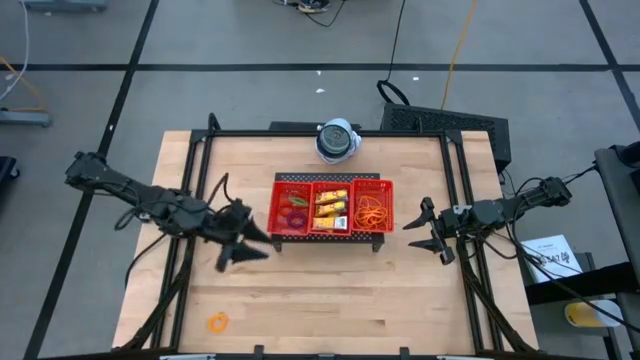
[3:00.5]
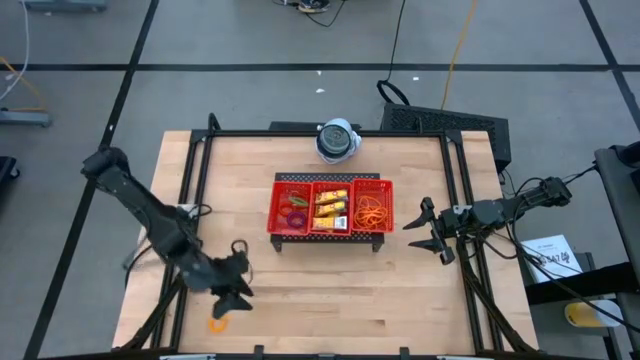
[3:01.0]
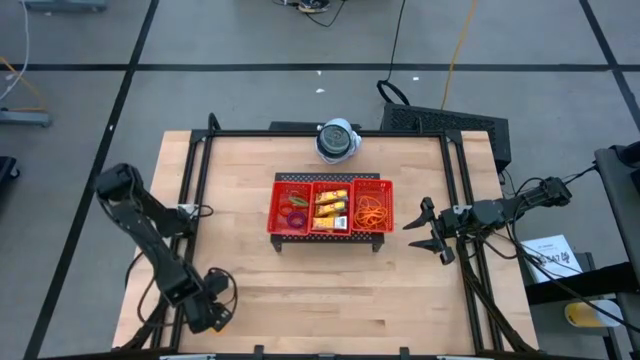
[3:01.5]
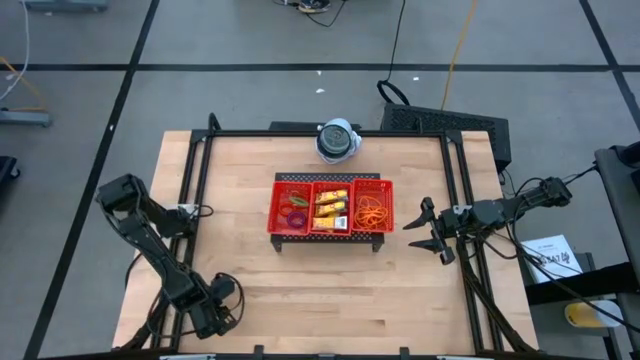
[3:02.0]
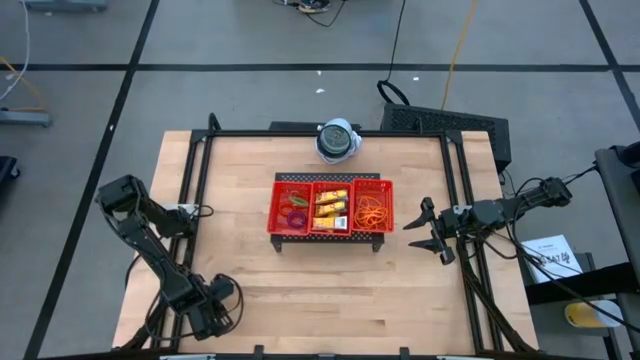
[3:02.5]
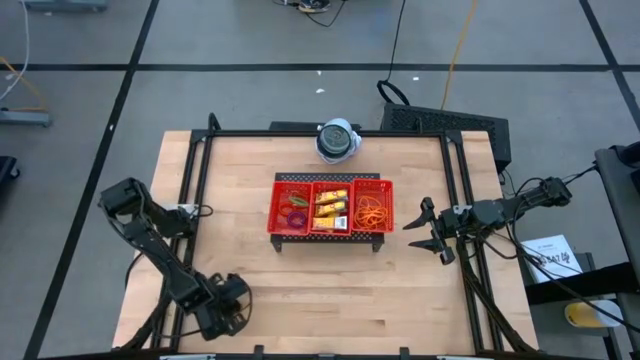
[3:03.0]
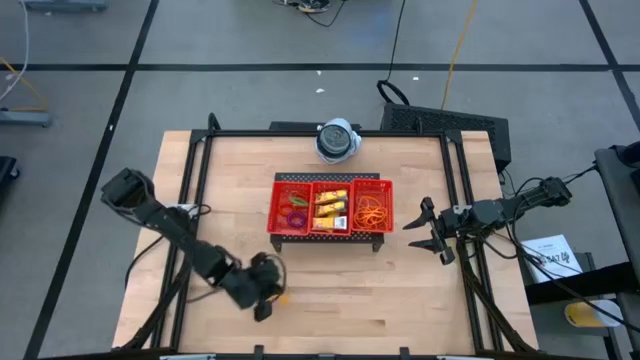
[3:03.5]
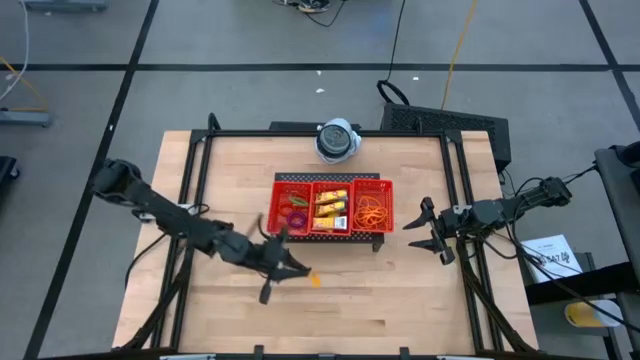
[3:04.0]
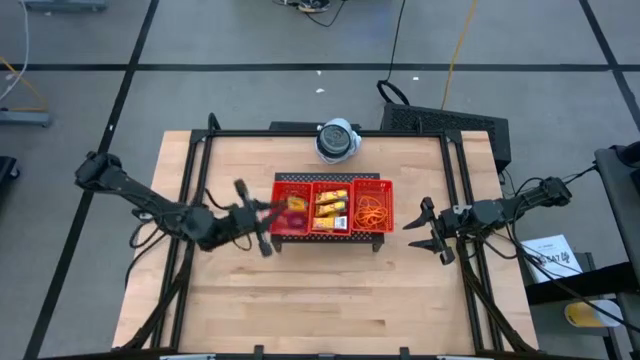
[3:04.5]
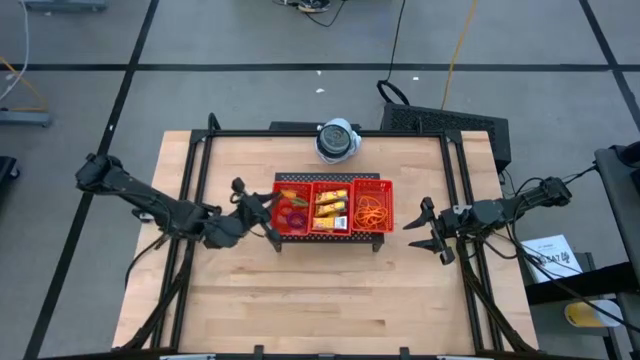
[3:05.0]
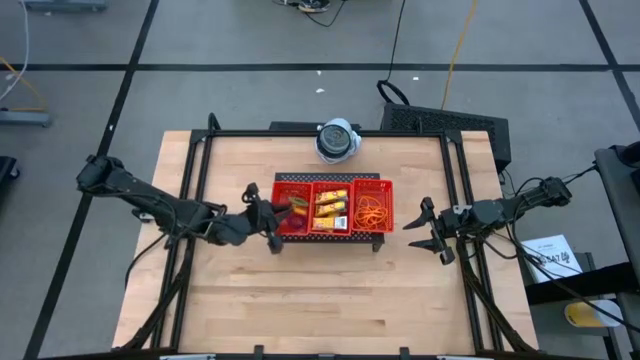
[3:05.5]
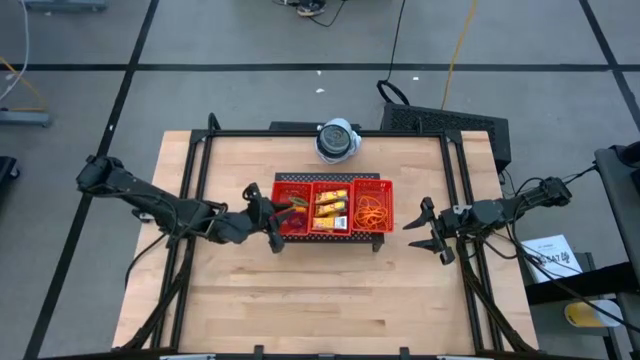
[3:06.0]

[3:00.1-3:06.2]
Task: Pick & Place Office Desk Supplies
Put the yellow spring keychain into the left red bin

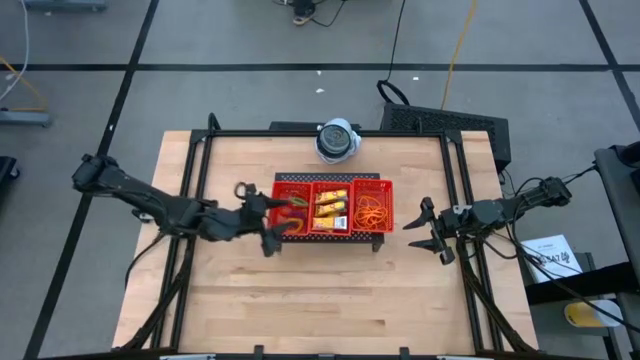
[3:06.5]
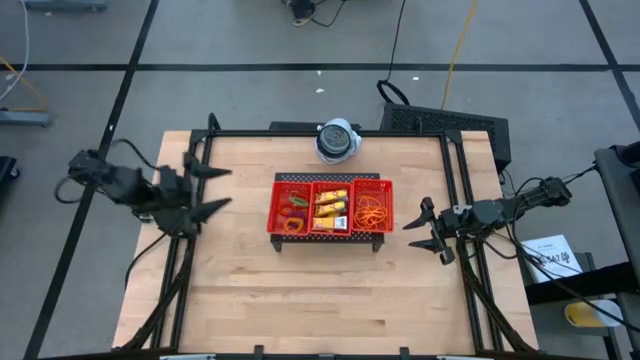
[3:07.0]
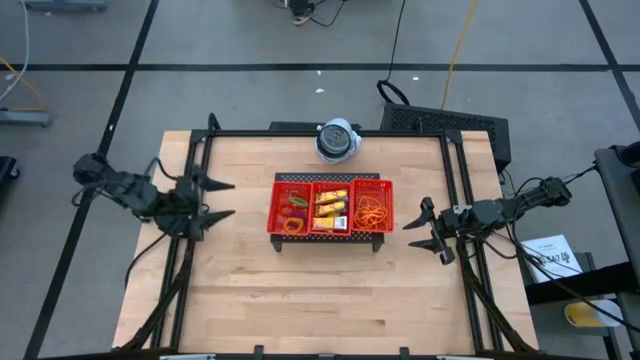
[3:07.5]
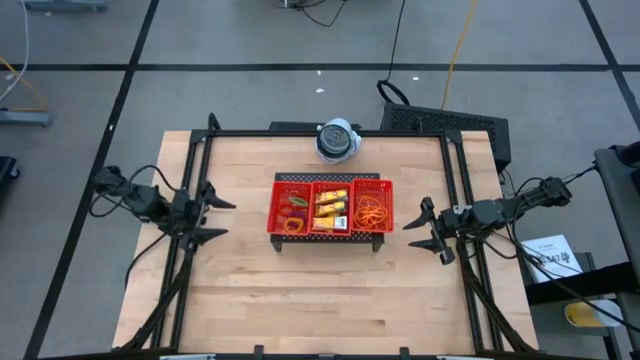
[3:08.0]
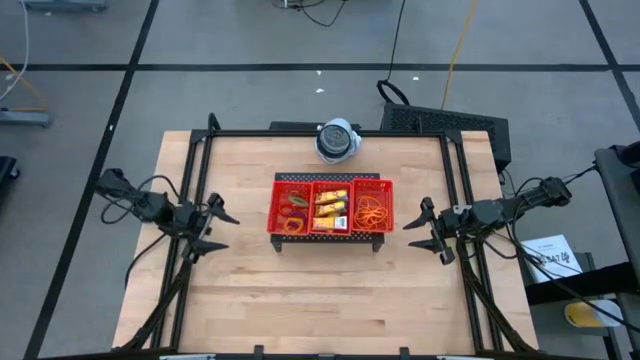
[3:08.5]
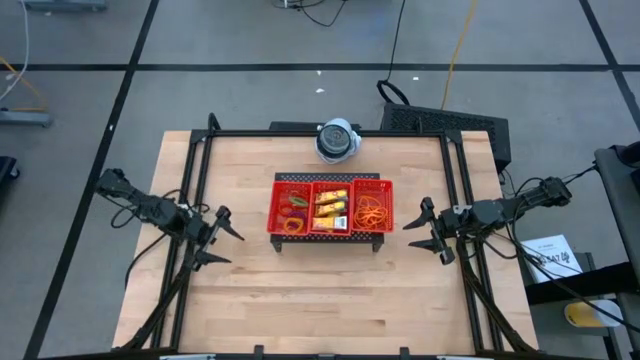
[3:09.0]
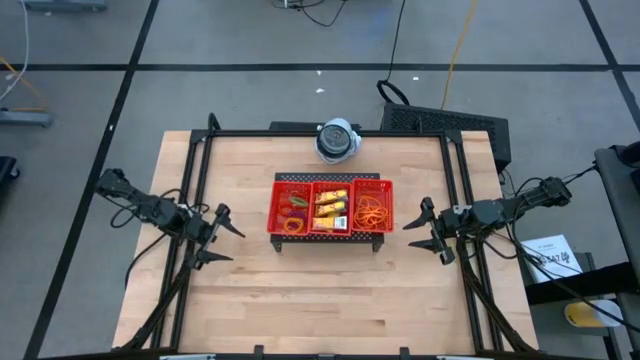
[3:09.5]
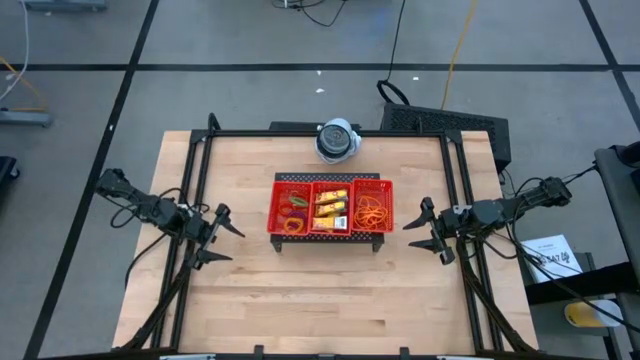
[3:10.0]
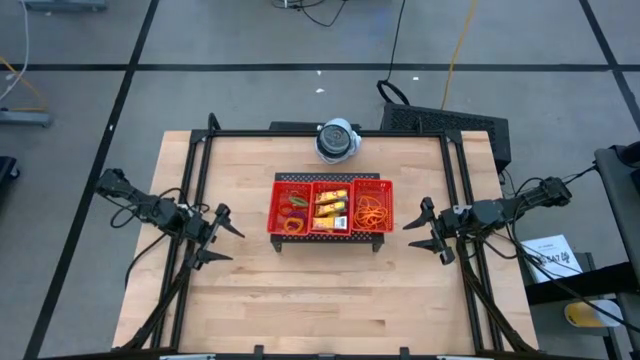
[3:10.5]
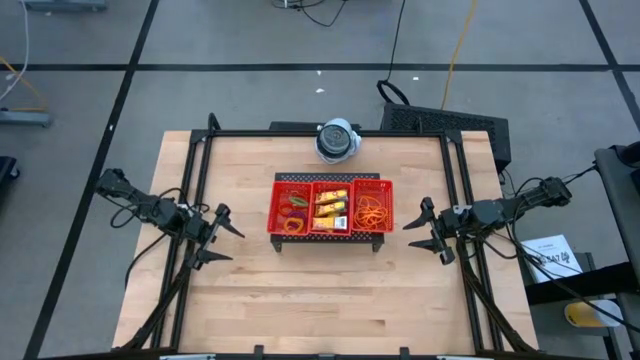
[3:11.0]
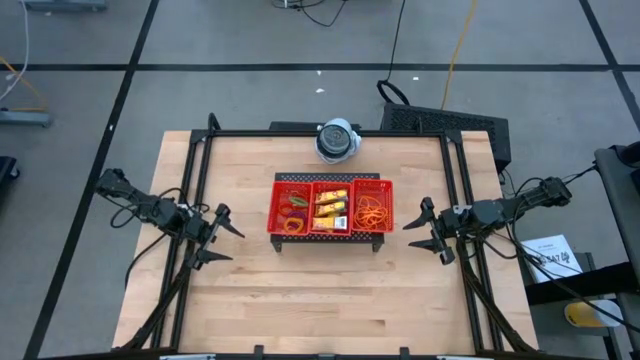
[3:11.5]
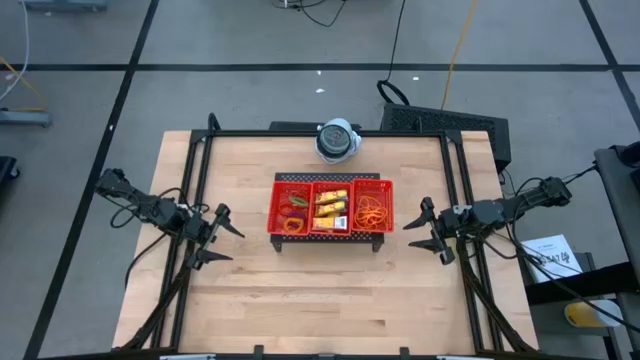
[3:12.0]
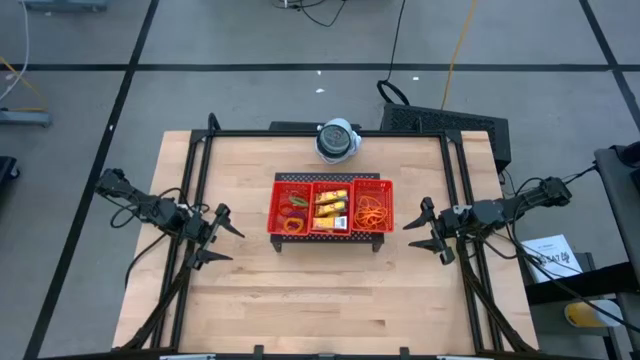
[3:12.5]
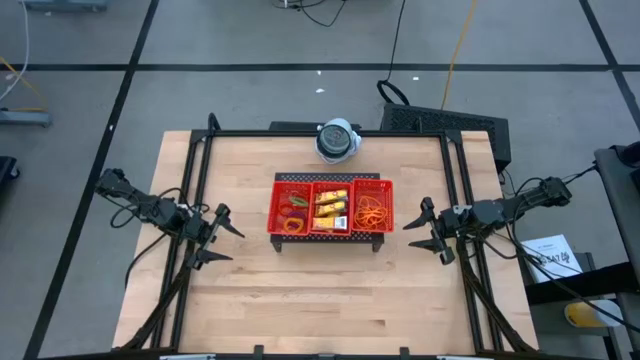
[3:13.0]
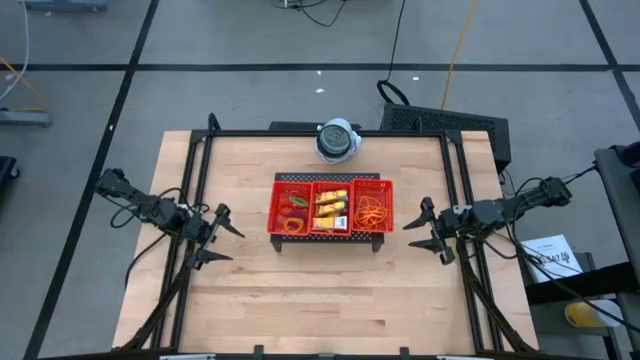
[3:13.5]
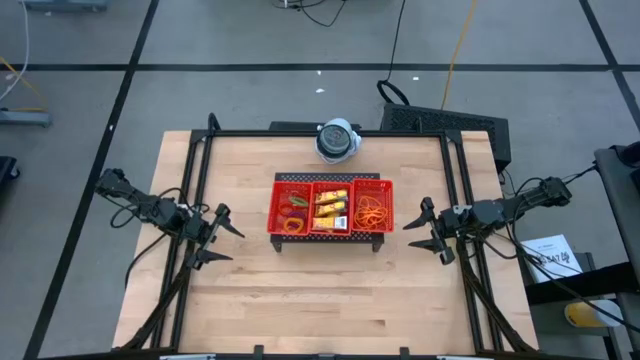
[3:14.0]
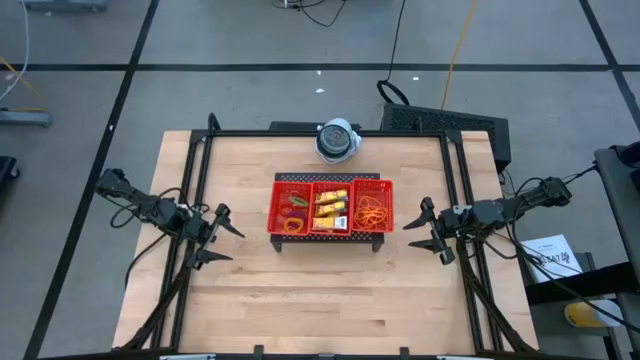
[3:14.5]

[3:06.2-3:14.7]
Return to Home Position

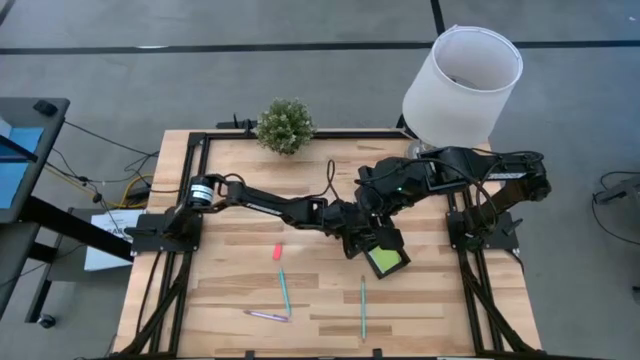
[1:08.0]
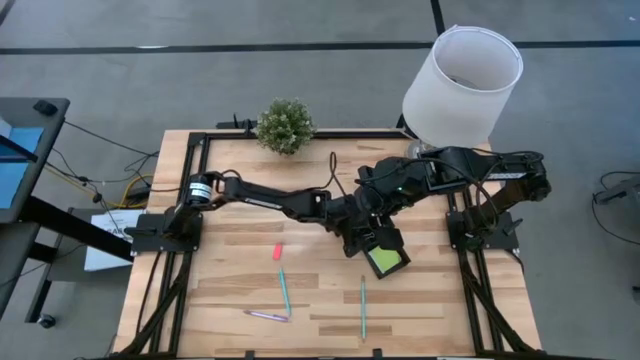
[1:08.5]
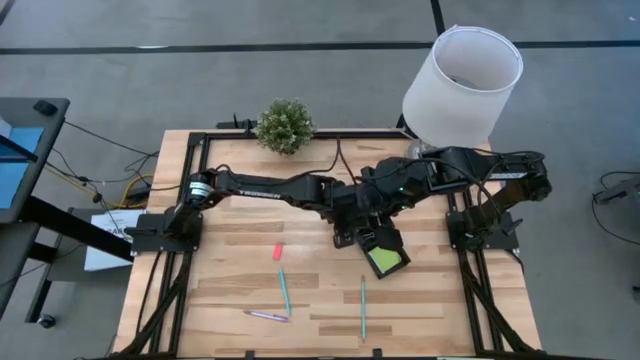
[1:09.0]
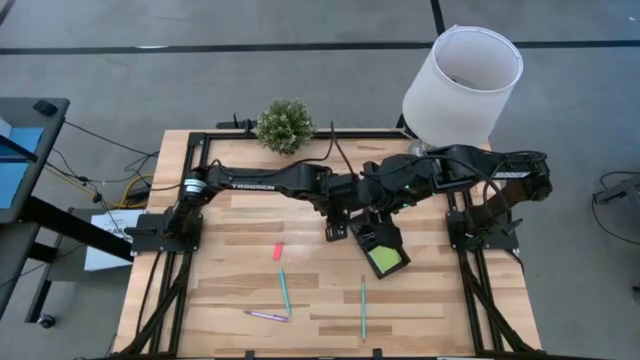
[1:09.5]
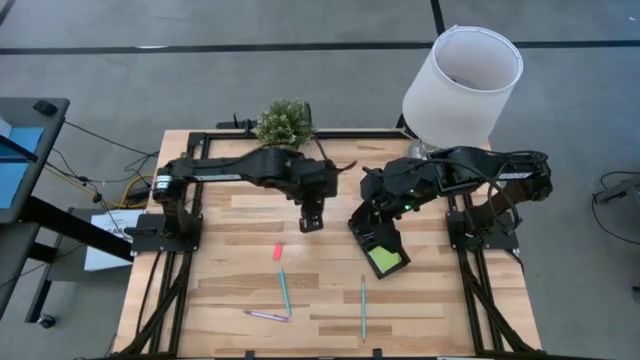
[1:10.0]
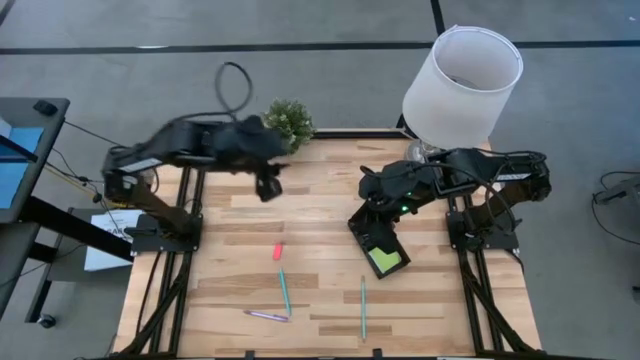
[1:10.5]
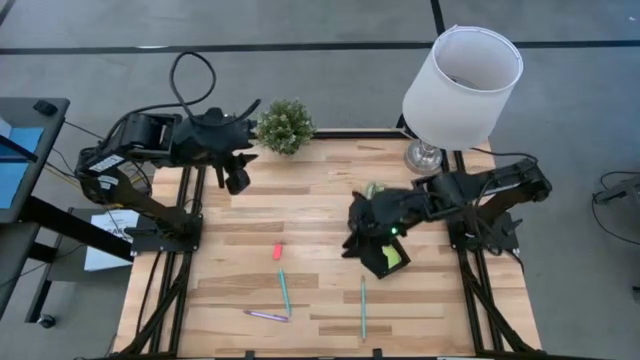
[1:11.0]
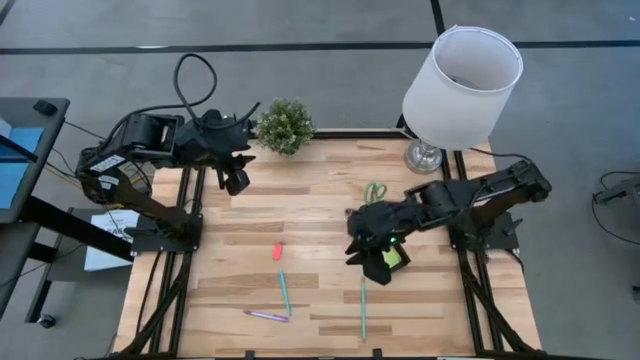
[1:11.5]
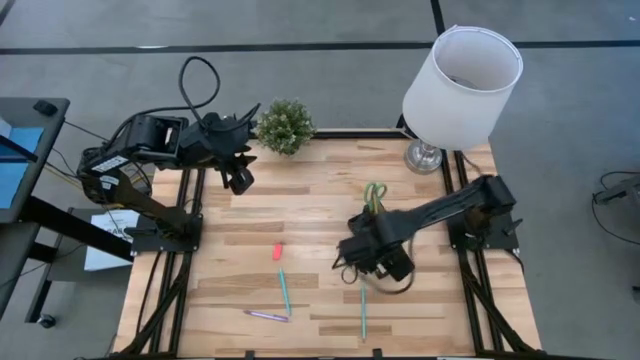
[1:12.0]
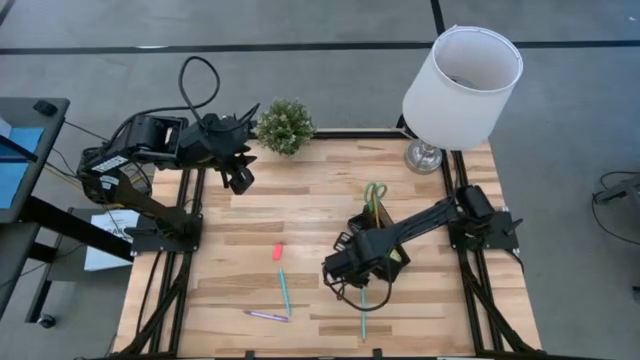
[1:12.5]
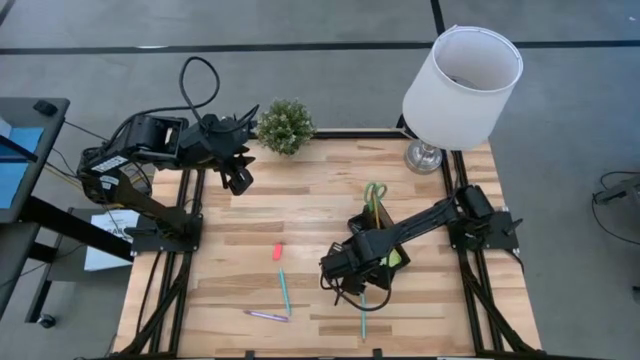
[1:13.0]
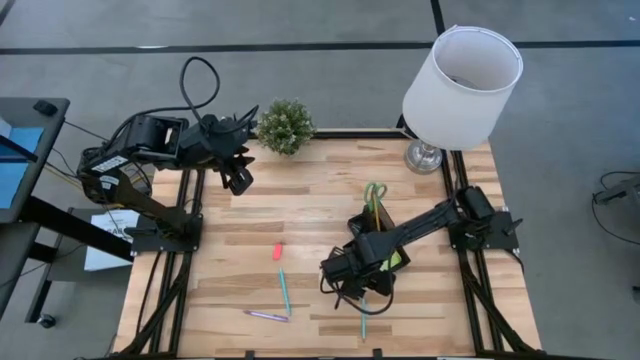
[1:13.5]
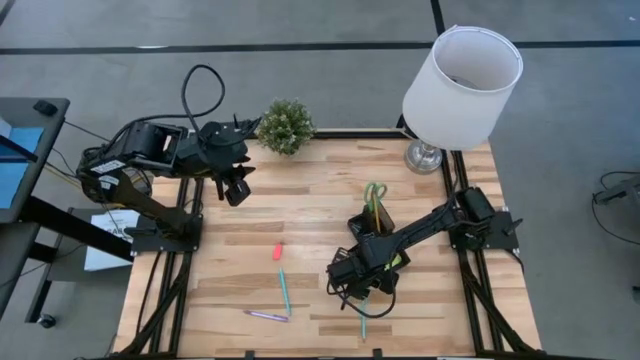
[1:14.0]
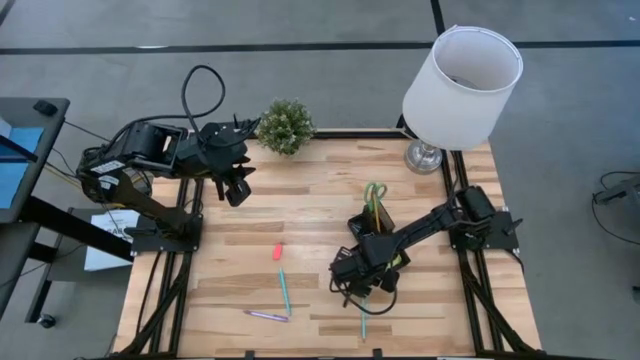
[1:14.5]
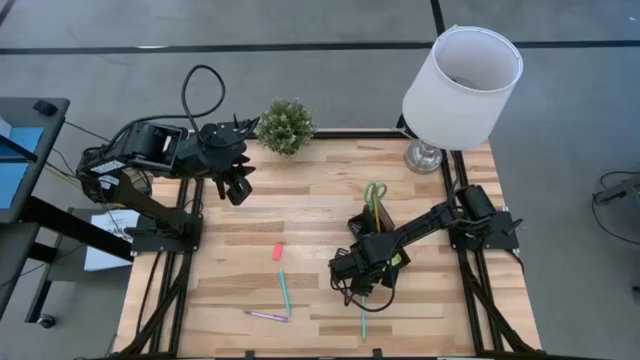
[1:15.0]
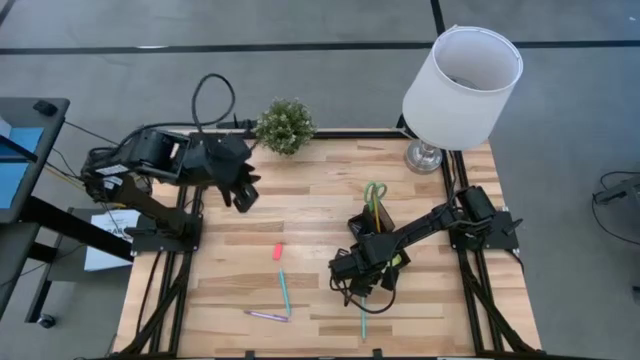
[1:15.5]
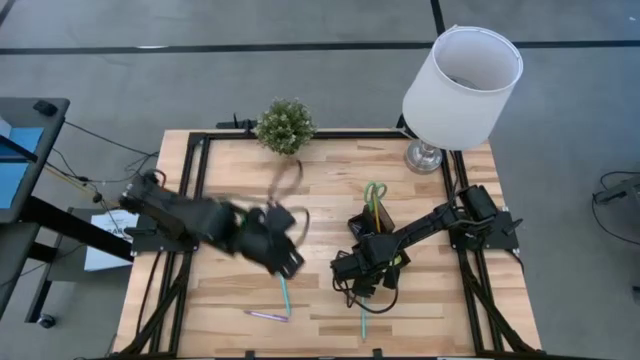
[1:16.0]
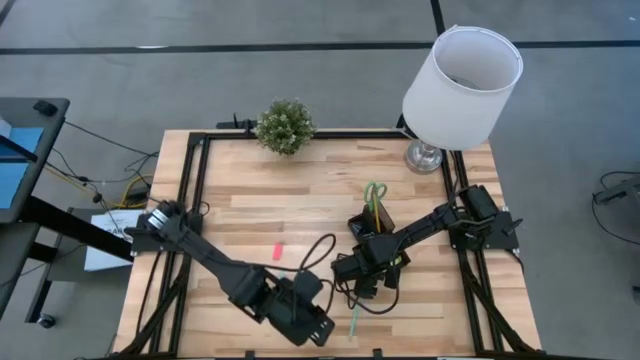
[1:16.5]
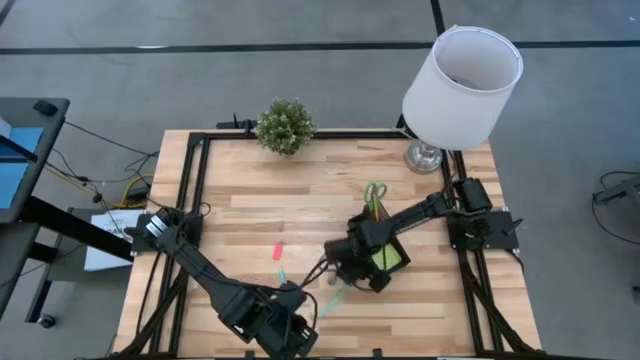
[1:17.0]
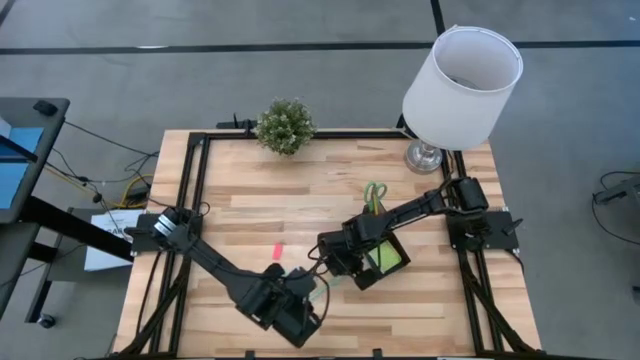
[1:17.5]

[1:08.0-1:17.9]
Task: Pick and place office supplies into organizer
Put the blue pencil into the black desk organizer
